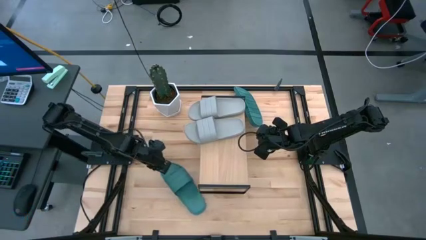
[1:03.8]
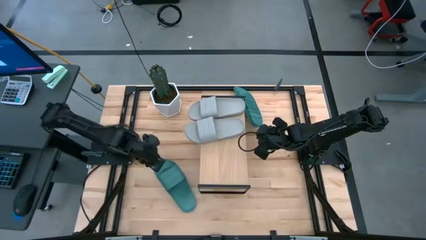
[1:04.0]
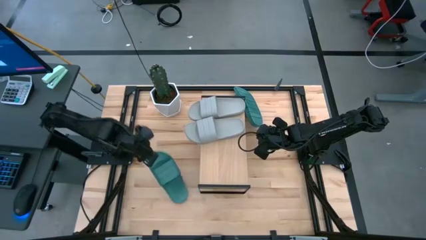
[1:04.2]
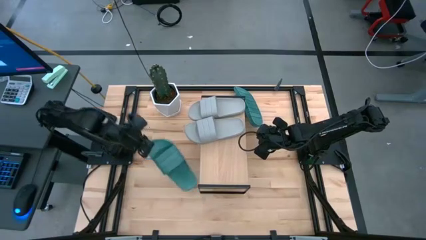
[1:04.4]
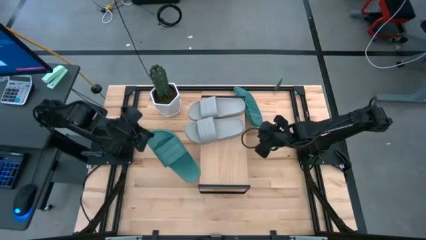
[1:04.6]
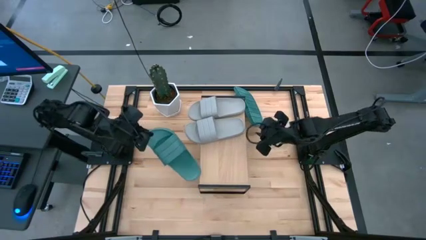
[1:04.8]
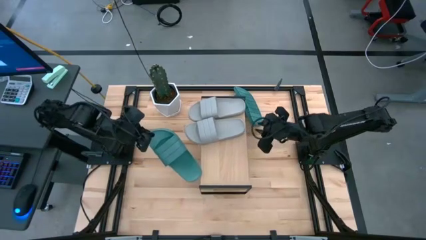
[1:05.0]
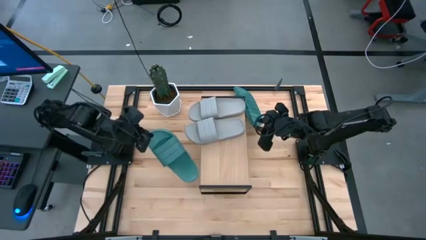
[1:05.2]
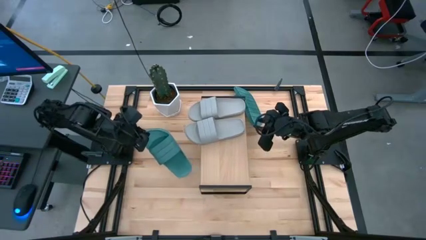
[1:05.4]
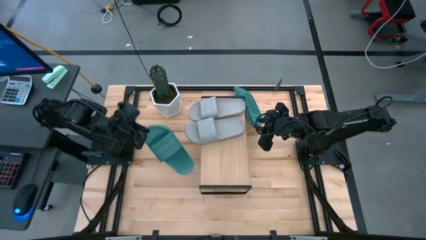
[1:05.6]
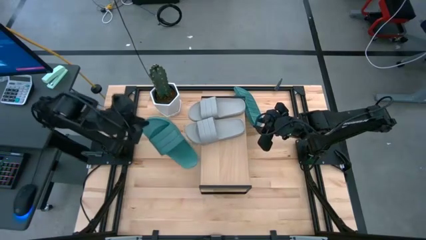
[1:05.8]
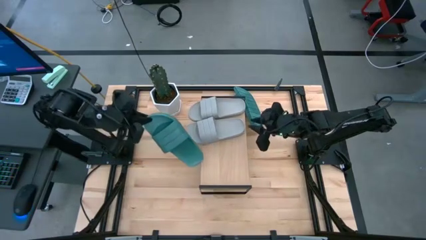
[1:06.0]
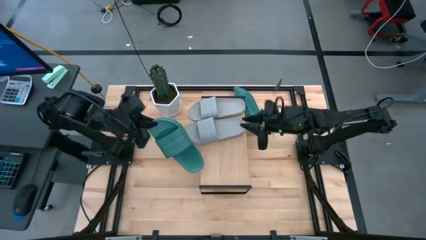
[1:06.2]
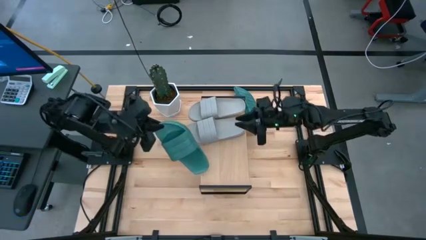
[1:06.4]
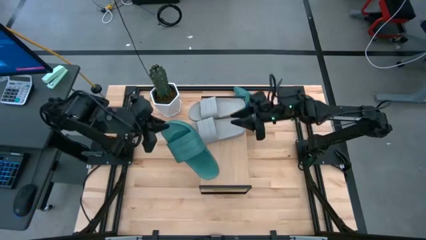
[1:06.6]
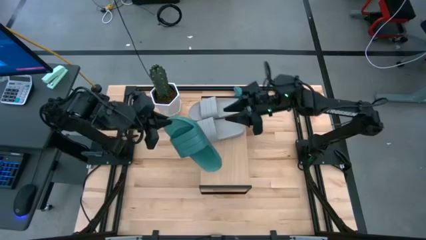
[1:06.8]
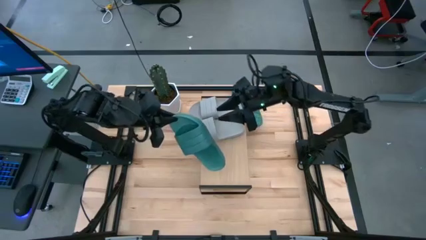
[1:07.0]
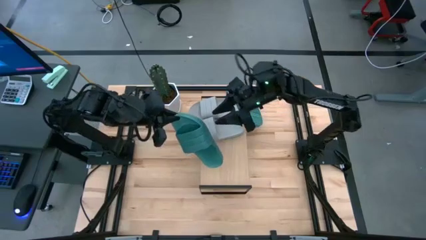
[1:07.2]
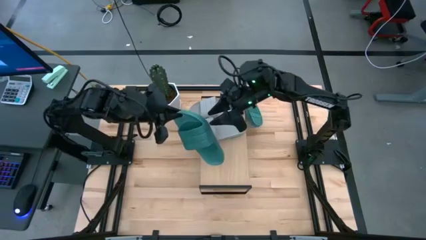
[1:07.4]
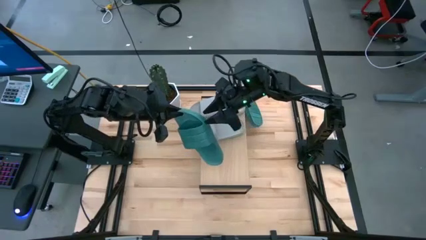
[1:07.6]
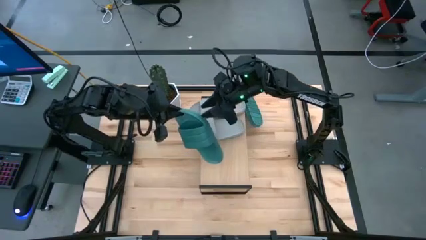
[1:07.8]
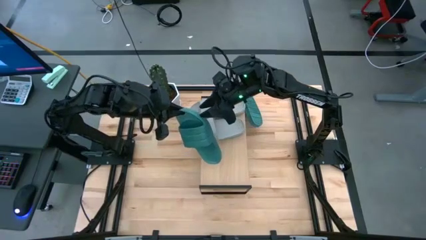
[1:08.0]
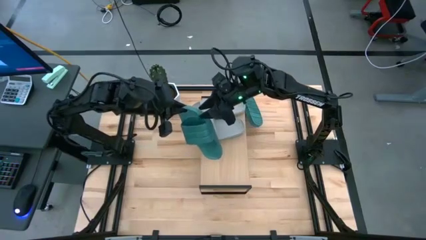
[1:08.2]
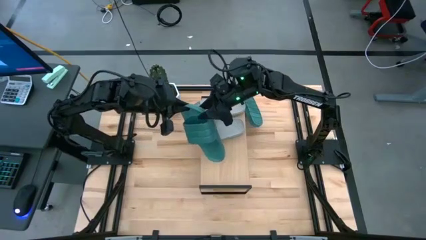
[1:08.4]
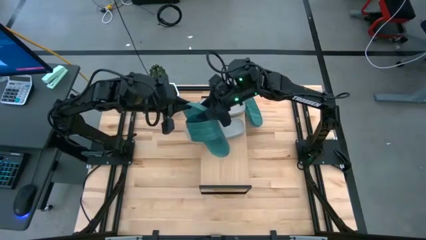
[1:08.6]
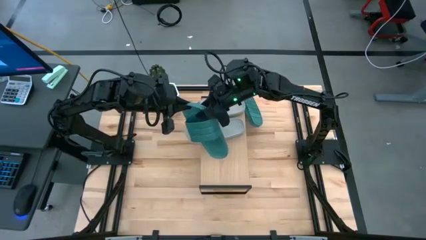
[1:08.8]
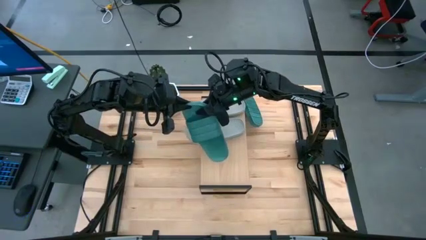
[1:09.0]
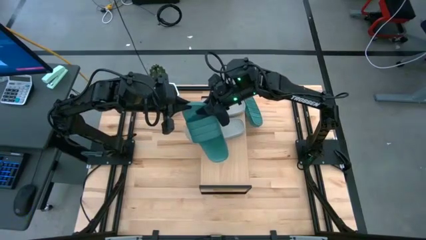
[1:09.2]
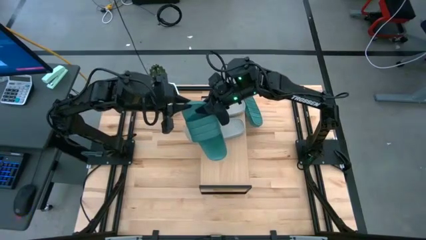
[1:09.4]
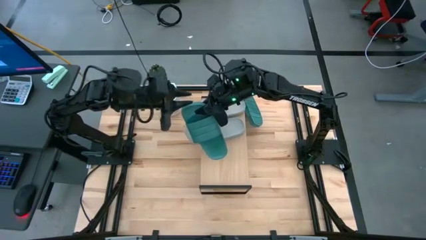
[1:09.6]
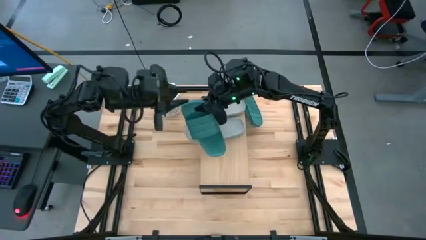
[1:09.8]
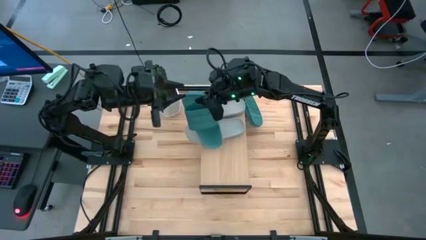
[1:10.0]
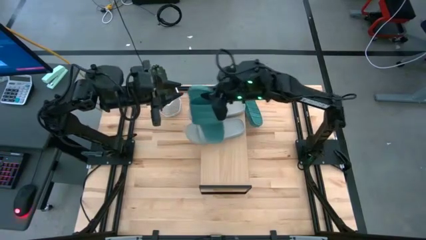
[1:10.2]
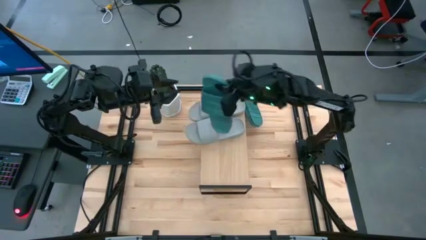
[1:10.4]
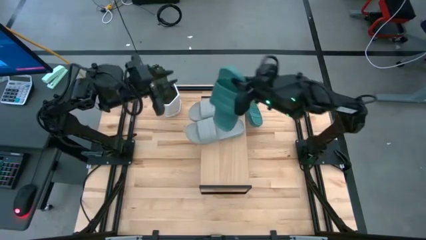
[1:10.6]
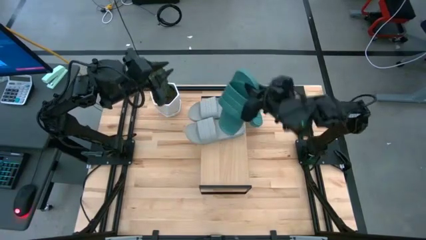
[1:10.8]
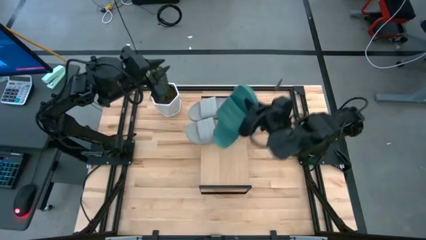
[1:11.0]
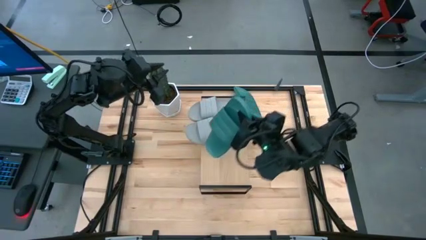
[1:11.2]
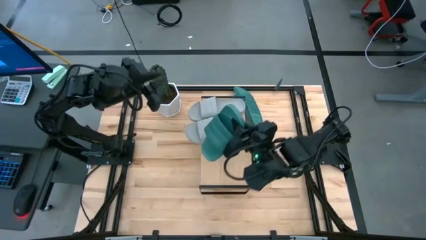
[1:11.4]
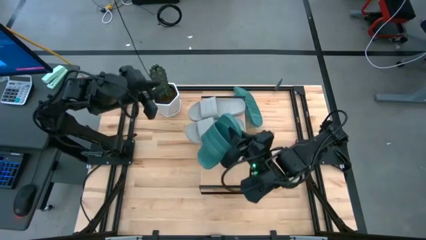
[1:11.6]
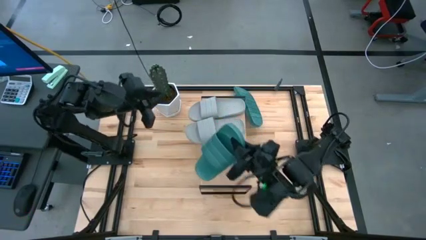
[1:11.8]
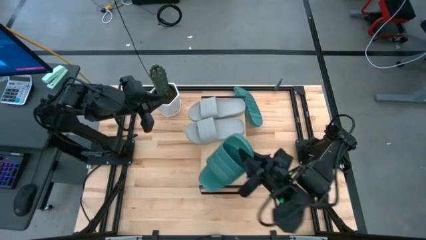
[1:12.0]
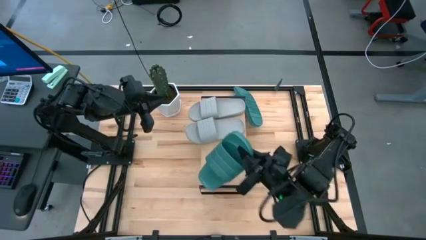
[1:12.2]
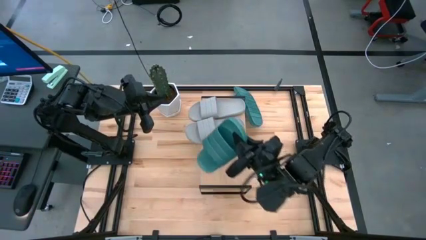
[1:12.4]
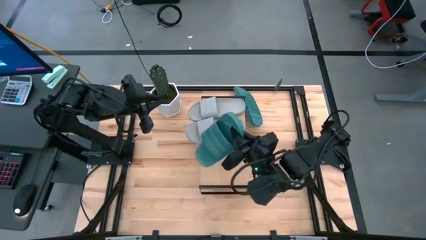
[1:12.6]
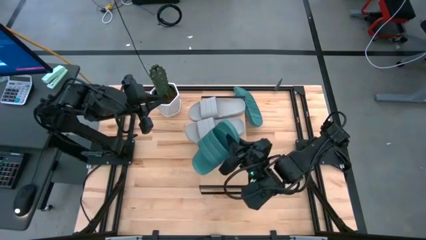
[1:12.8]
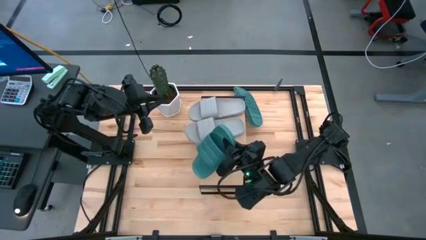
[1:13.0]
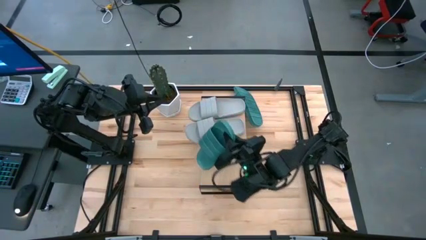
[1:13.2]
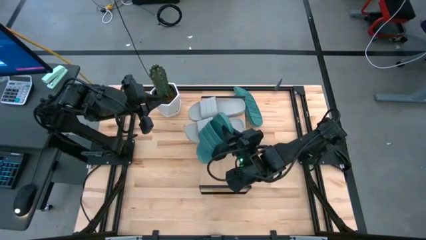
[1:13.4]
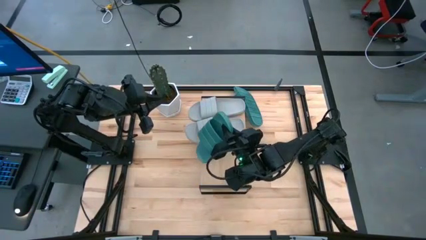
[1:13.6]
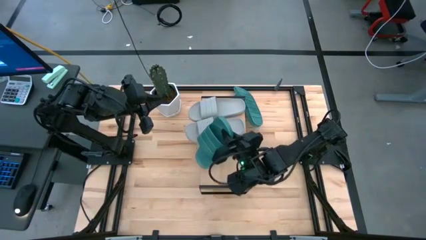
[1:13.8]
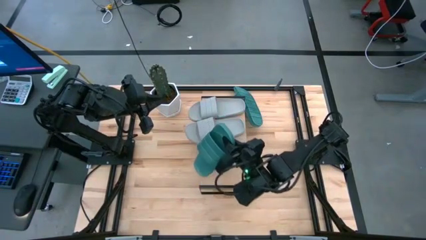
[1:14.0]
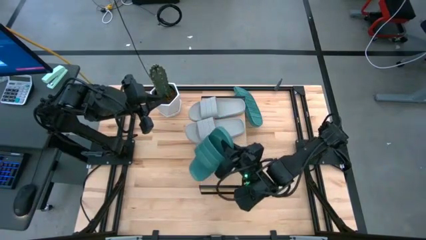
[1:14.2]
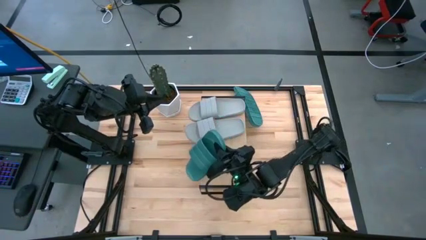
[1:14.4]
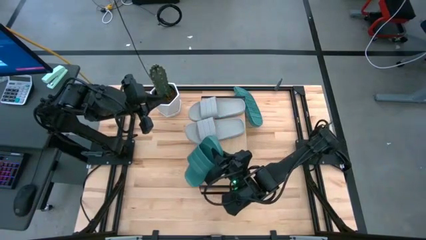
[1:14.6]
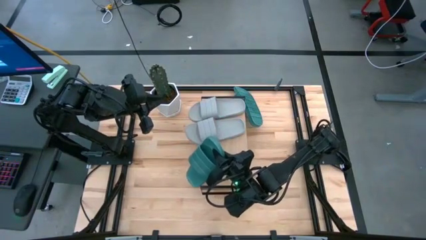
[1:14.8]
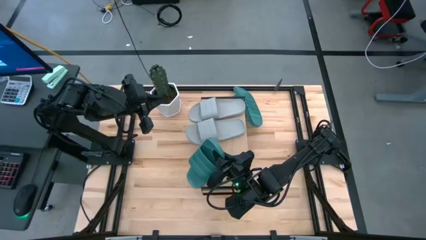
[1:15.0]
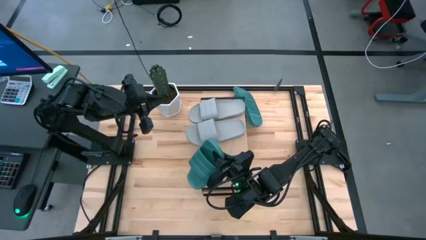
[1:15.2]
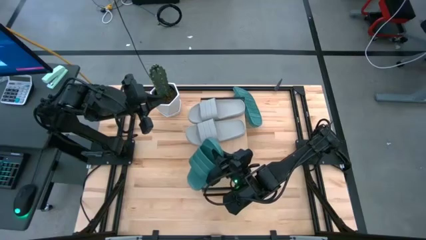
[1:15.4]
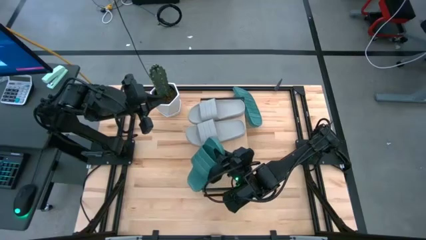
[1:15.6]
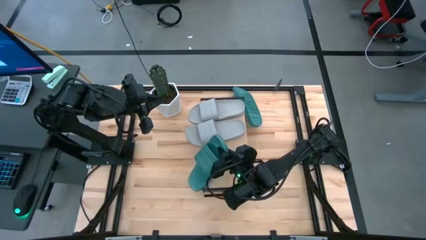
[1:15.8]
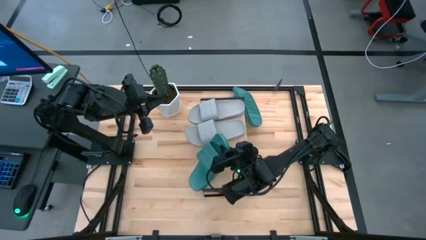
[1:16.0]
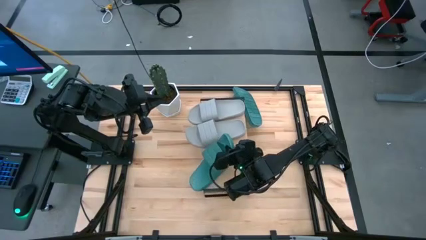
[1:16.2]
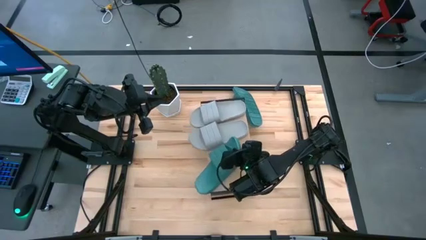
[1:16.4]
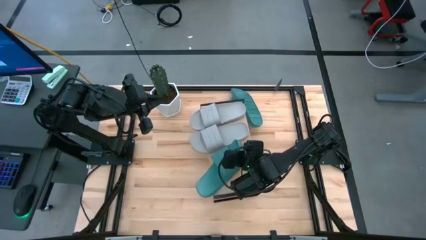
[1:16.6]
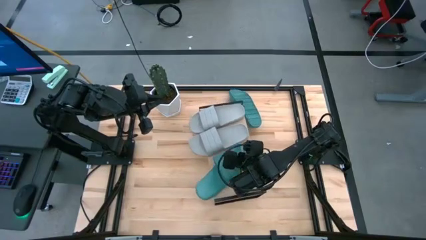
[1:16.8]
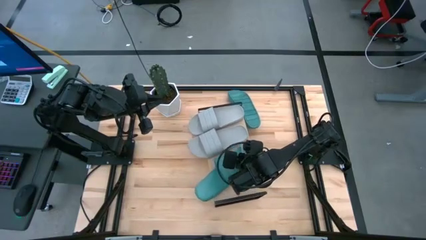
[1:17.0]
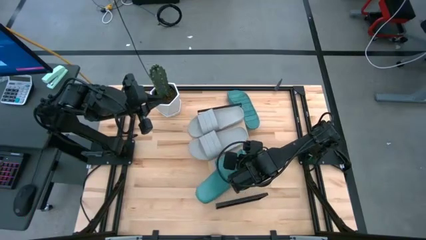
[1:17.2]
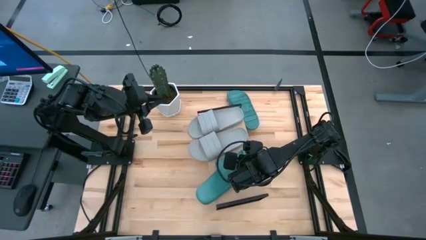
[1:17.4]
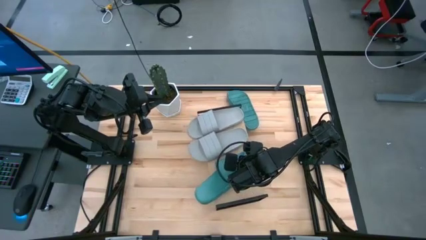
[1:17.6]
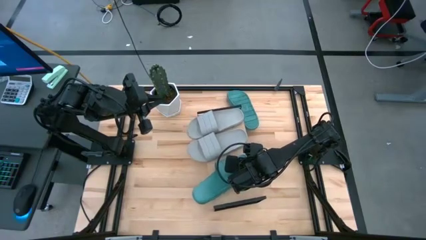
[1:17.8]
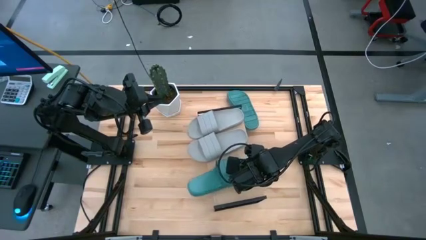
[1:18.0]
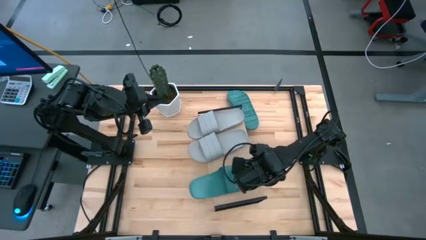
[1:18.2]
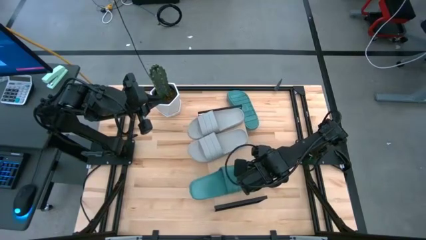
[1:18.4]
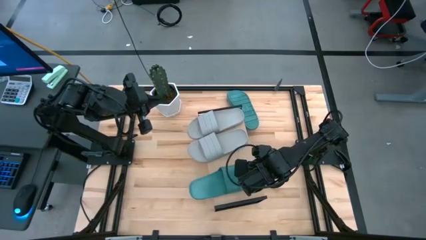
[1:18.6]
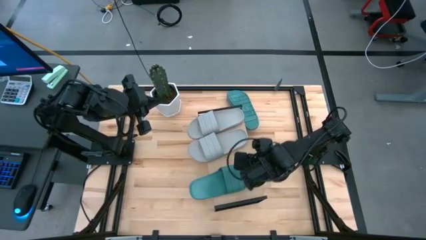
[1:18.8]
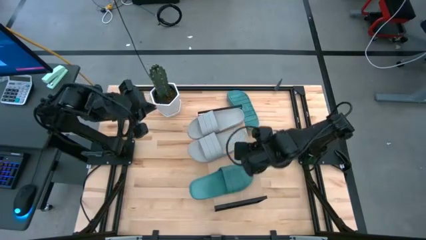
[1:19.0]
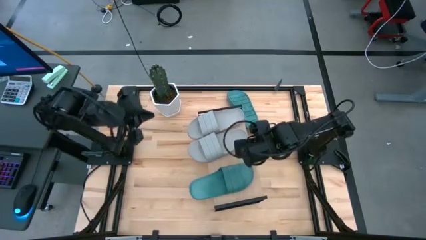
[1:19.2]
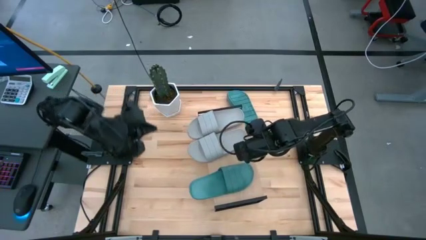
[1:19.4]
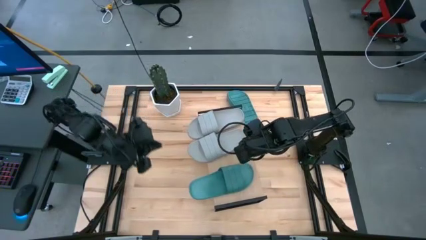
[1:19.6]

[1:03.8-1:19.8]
Task: Pick and place slides into the shelf
Put the bottom green slipper on the shelf
